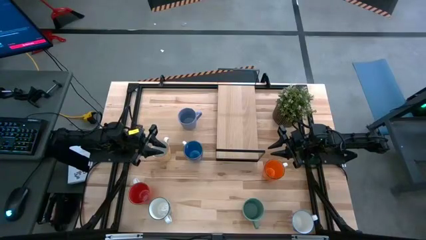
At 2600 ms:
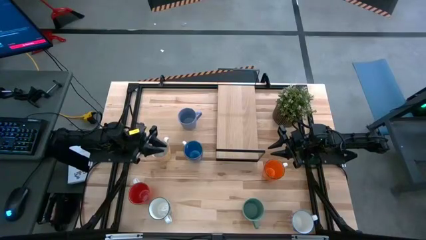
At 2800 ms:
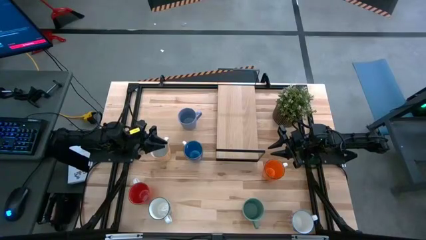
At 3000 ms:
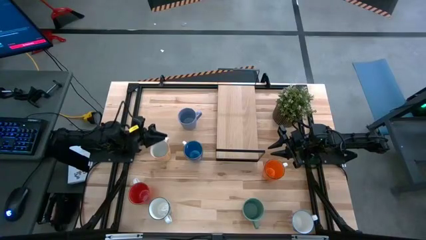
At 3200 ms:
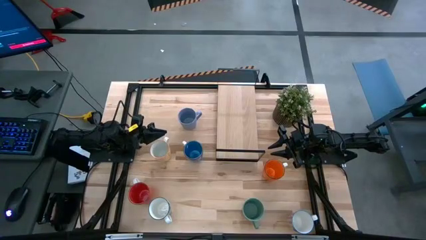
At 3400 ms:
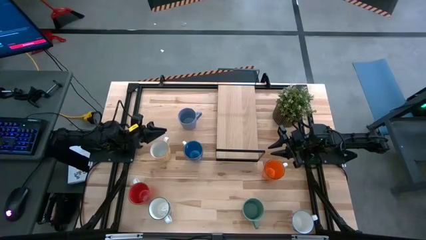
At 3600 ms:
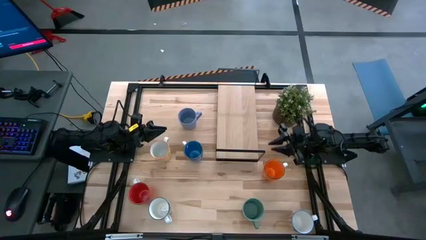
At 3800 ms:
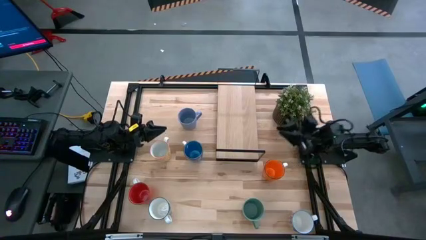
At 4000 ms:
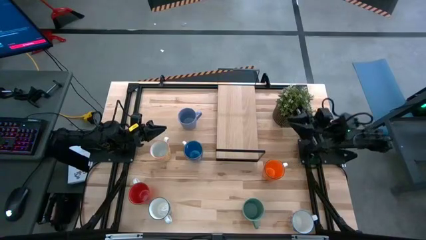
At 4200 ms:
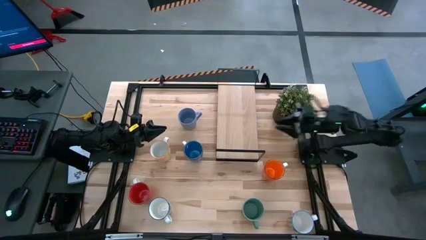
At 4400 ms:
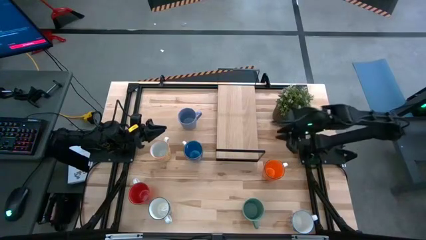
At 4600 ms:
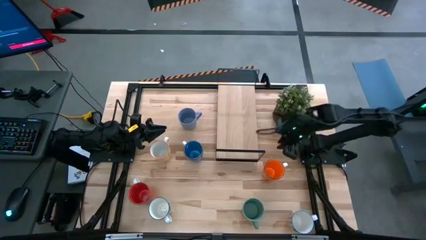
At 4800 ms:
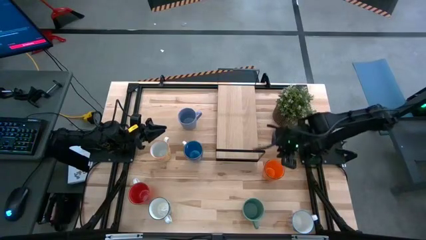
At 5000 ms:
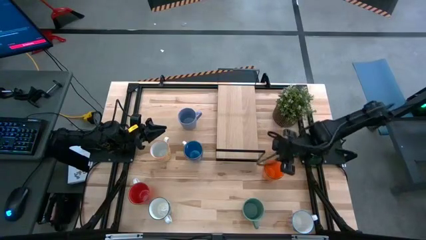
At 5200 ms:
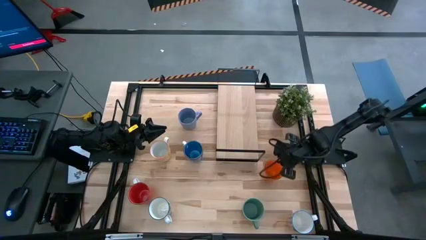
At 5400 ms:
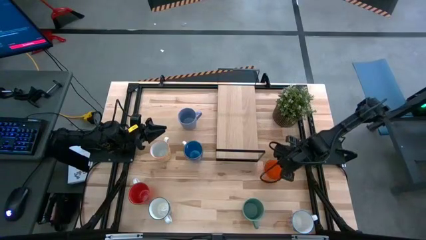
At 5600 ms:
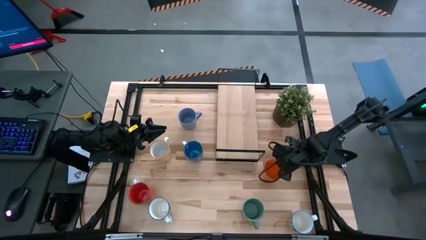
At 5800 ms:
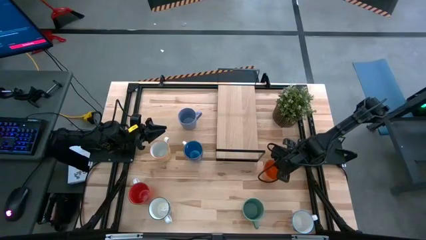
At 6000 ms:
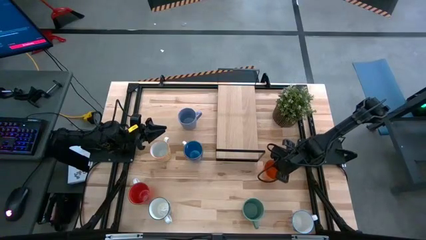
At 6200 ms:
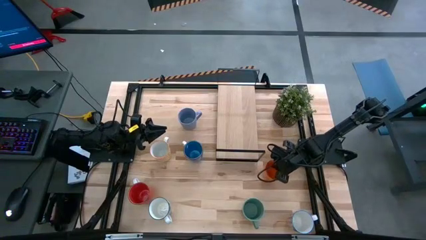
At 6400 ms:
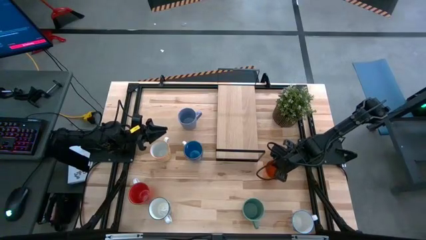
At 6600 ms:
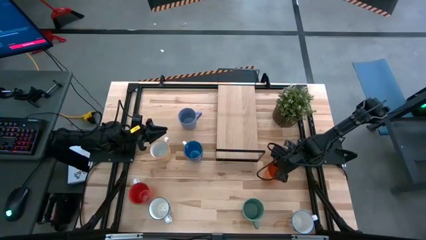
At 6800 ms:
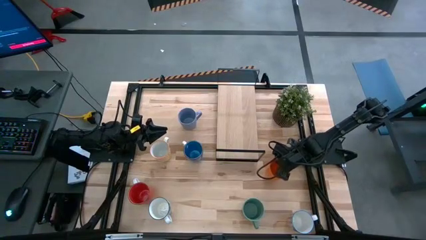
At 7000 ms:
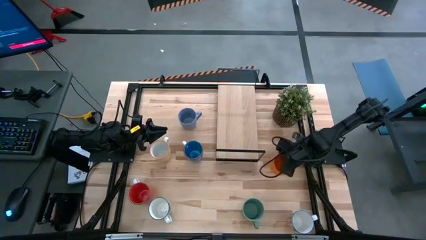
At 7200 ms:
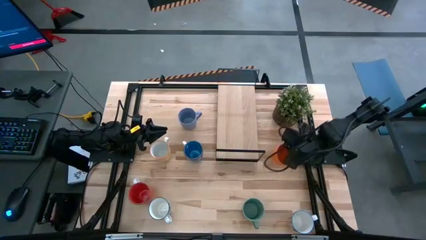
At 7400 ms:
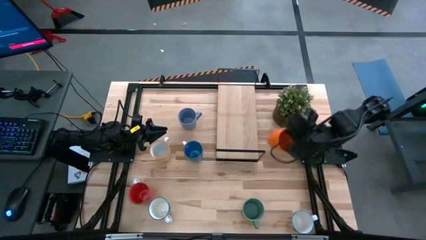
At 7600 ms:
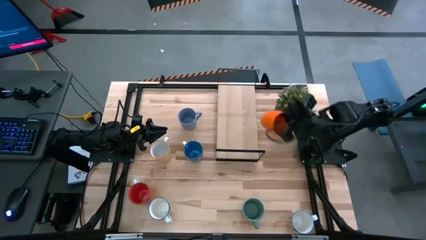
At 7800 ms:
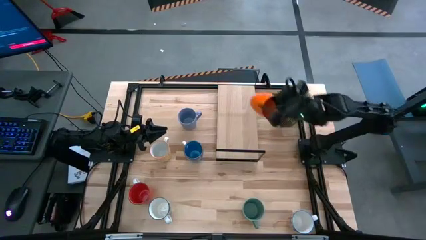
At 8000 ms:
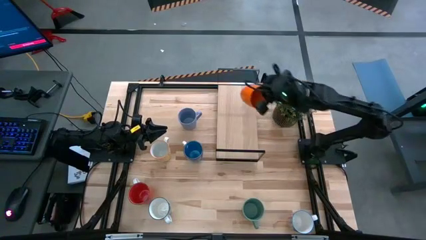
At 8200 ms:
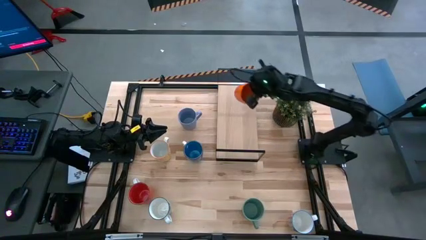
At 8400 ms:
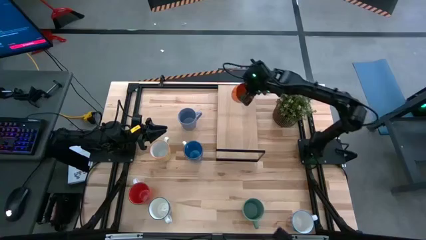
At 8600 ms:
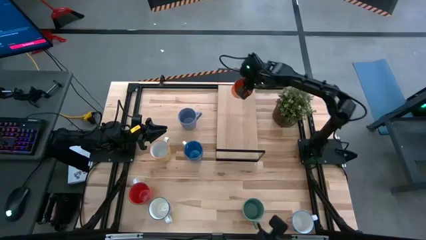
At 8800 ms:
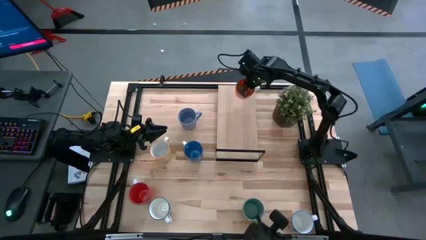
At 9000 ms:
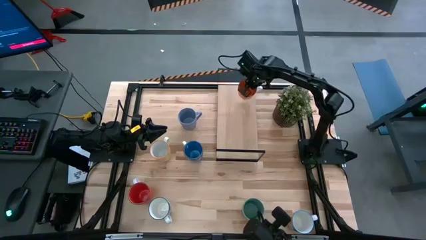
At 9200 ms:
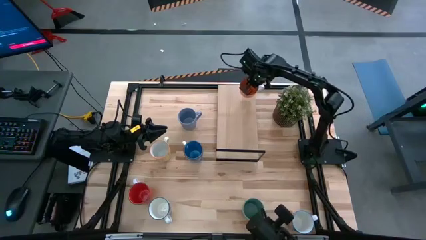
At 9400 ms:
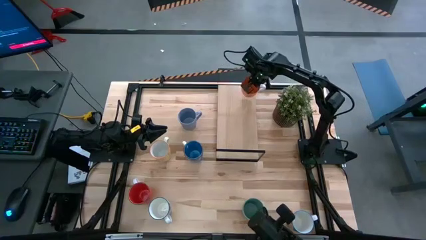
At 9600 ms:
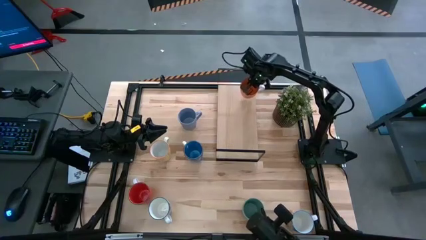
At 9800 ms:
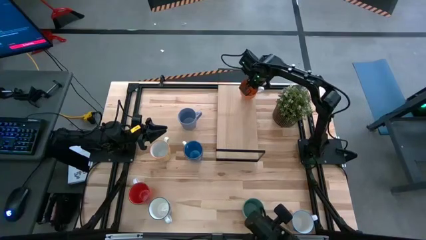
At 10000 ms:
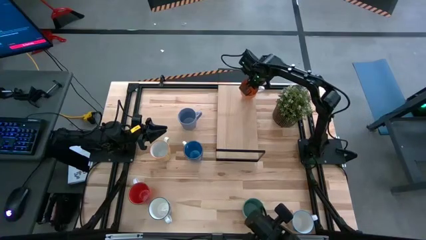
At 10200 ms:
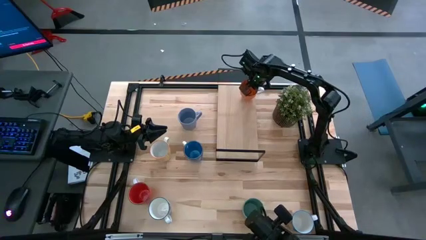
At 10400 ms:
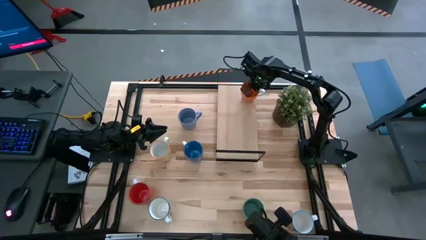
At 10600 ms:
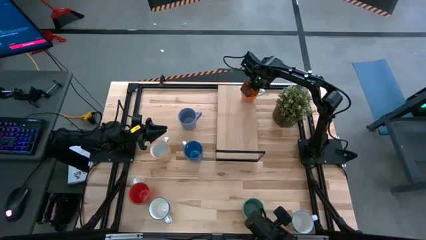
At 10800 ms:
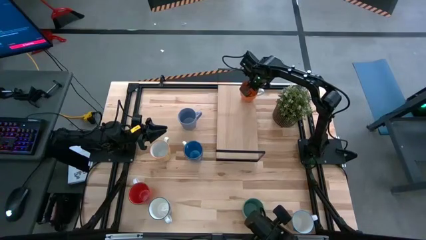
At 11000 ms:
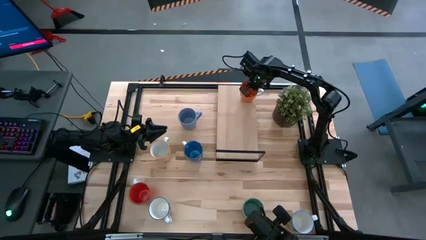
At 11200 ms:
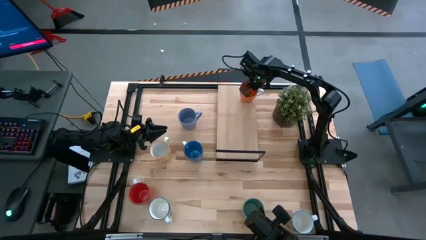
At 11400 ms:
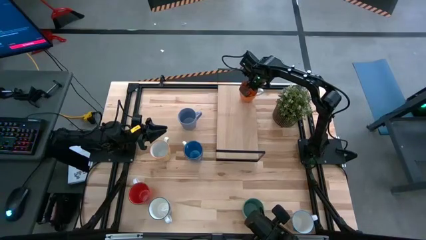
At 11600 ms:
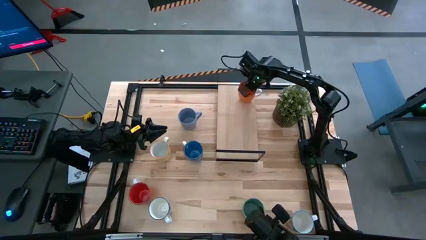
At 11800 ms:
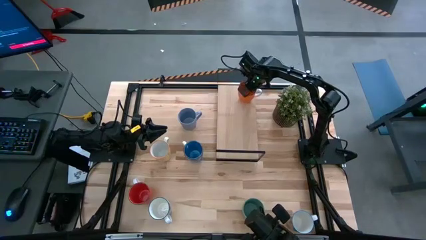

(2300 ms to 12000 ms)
Task: Place coffee mugs
Put the orange mug on the shelf
